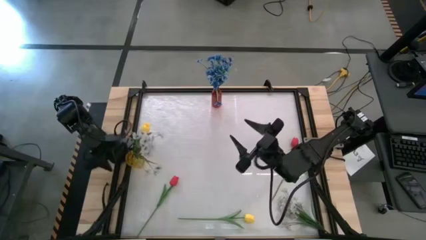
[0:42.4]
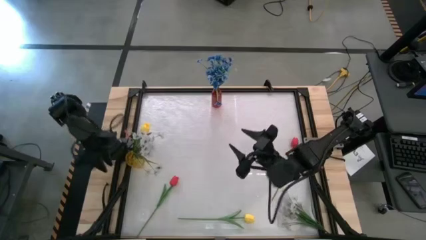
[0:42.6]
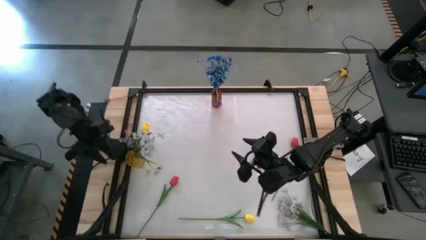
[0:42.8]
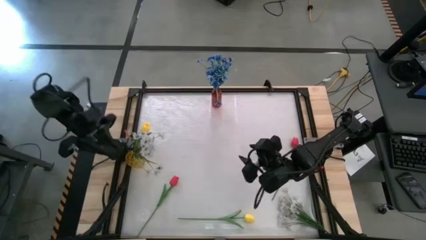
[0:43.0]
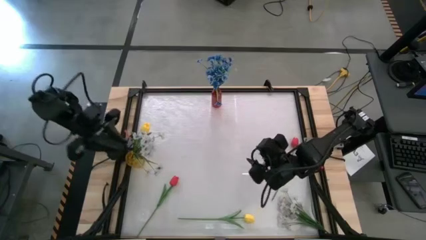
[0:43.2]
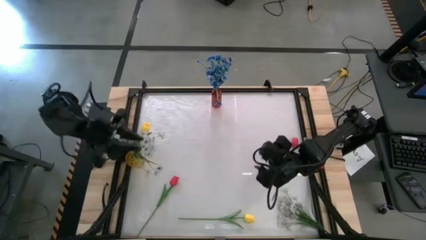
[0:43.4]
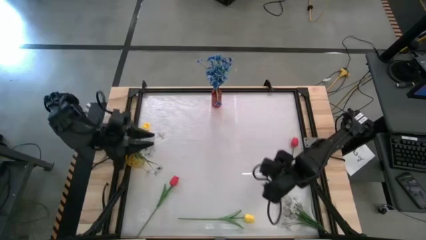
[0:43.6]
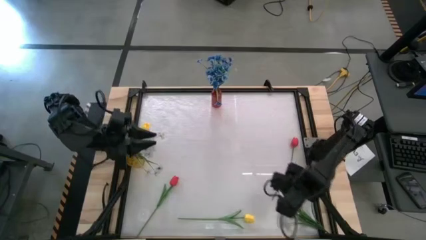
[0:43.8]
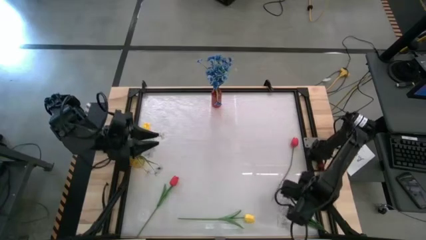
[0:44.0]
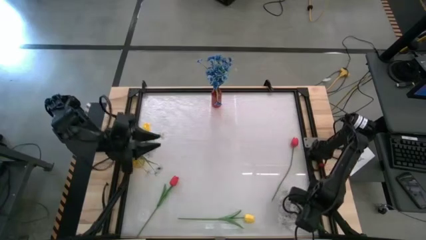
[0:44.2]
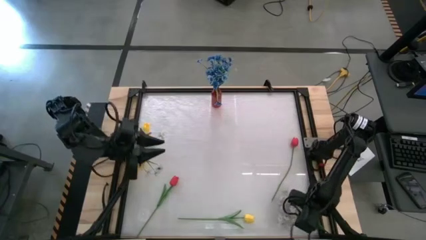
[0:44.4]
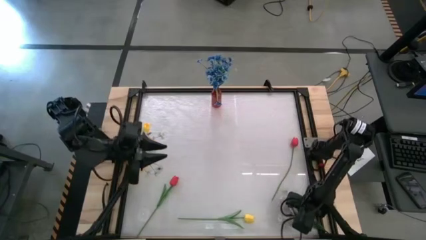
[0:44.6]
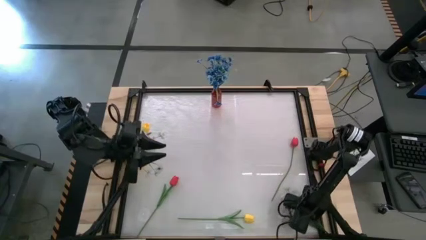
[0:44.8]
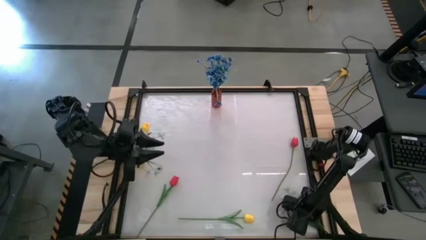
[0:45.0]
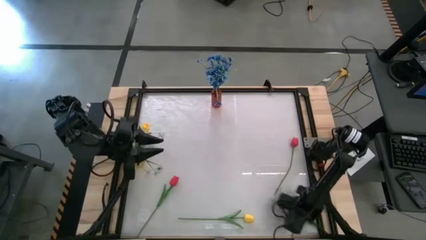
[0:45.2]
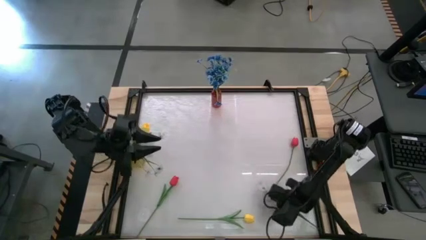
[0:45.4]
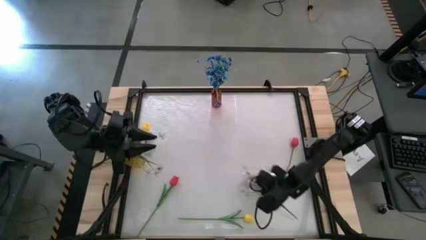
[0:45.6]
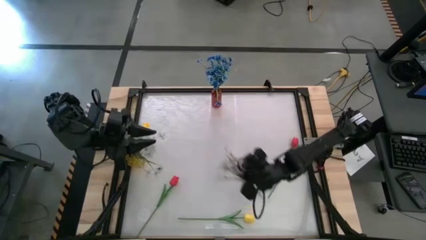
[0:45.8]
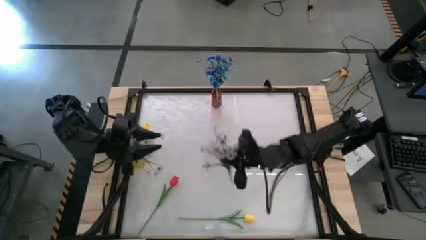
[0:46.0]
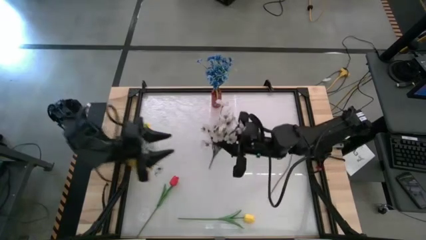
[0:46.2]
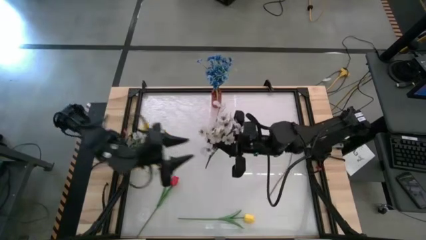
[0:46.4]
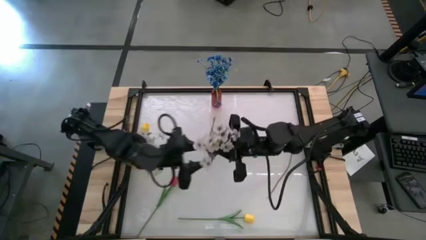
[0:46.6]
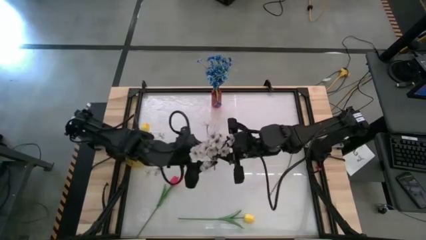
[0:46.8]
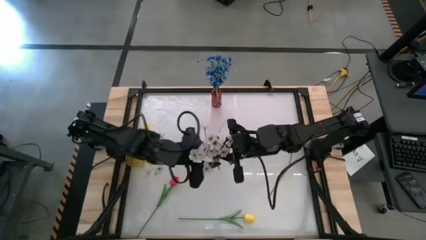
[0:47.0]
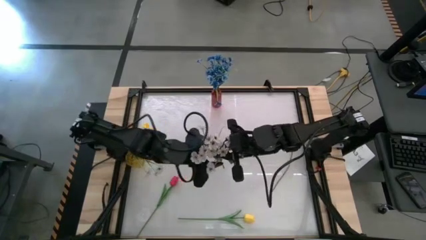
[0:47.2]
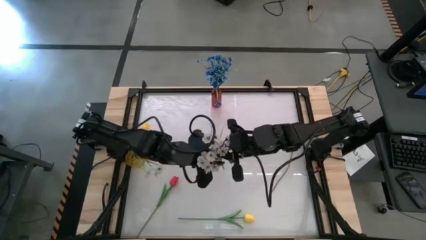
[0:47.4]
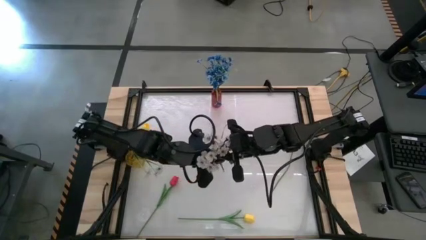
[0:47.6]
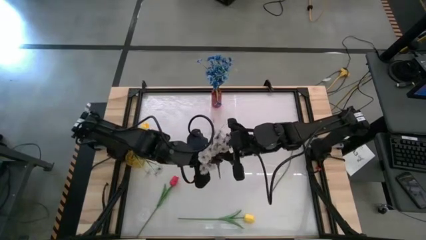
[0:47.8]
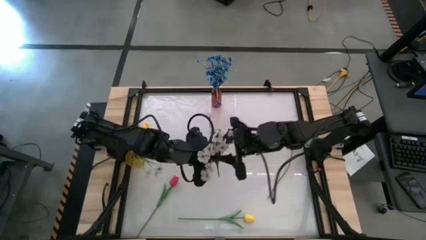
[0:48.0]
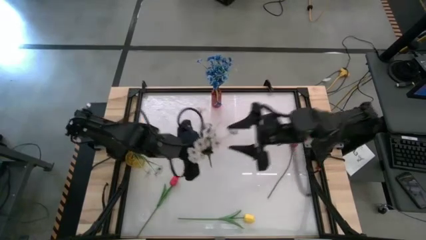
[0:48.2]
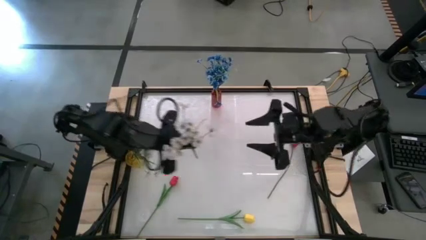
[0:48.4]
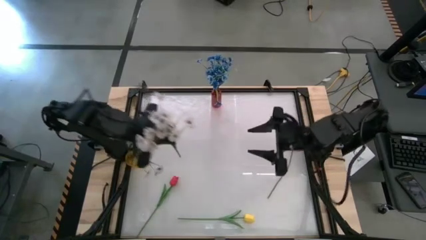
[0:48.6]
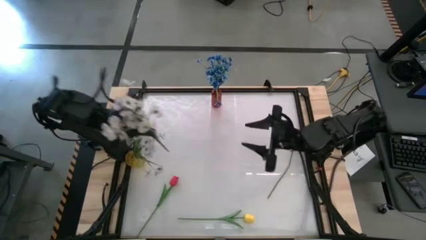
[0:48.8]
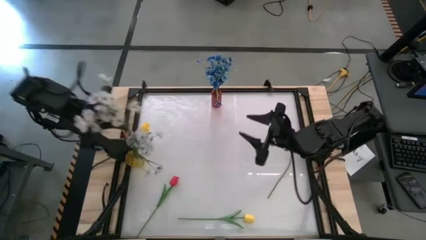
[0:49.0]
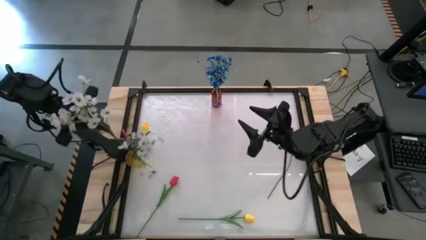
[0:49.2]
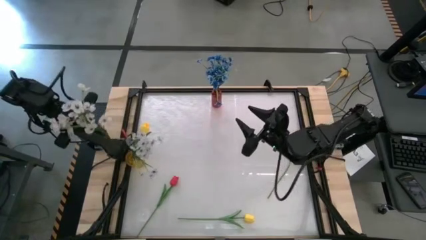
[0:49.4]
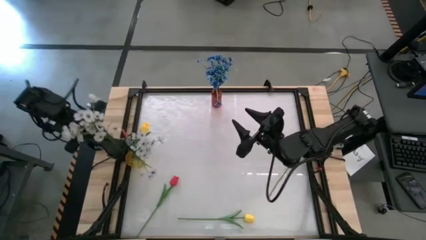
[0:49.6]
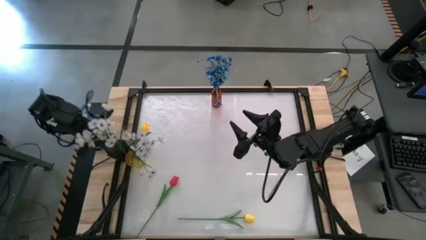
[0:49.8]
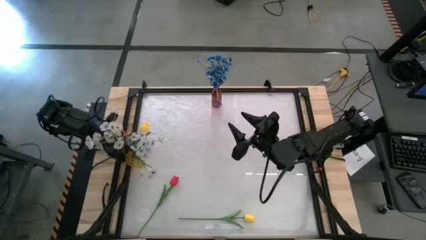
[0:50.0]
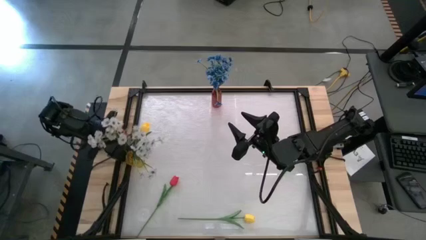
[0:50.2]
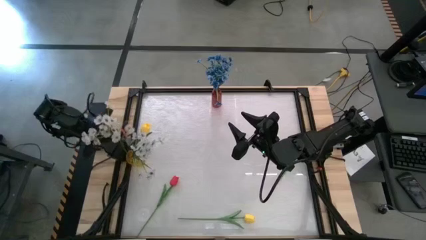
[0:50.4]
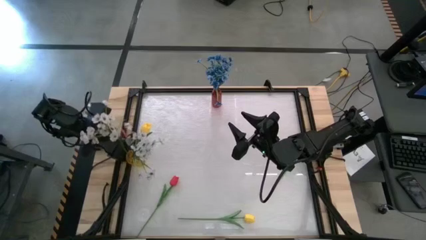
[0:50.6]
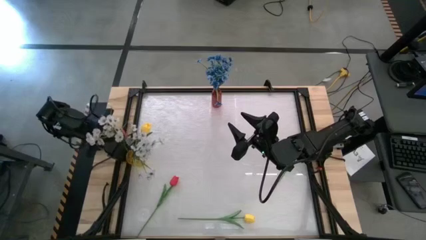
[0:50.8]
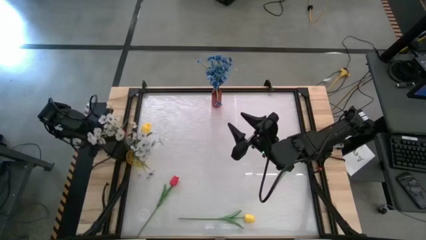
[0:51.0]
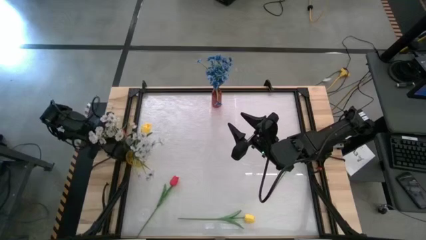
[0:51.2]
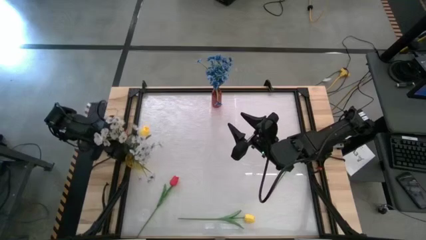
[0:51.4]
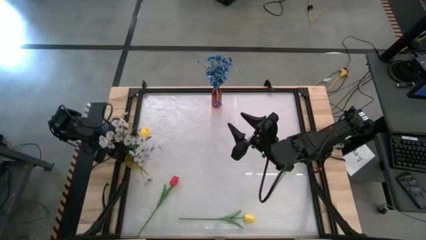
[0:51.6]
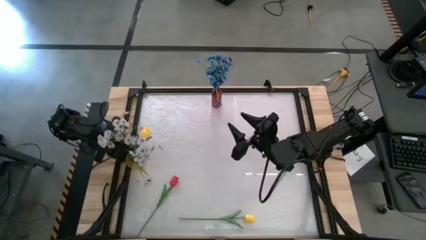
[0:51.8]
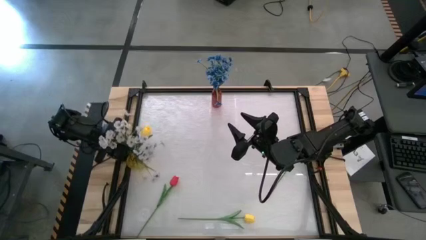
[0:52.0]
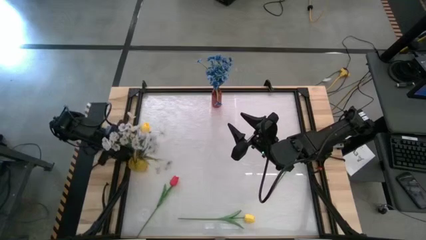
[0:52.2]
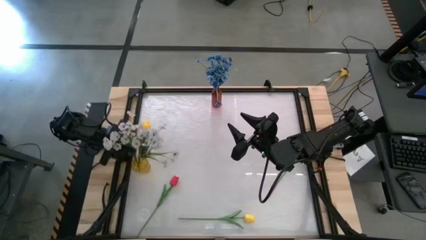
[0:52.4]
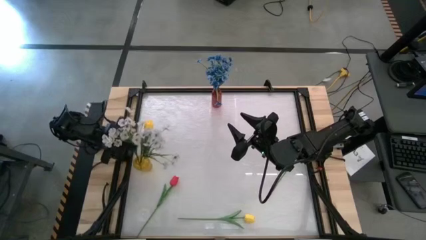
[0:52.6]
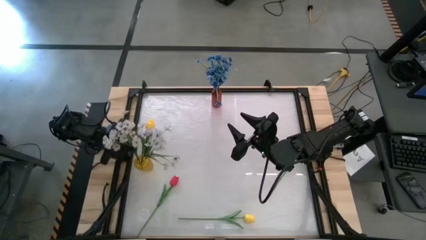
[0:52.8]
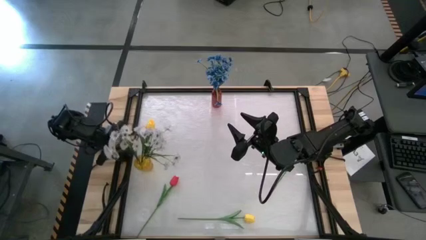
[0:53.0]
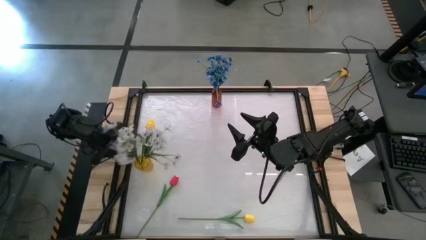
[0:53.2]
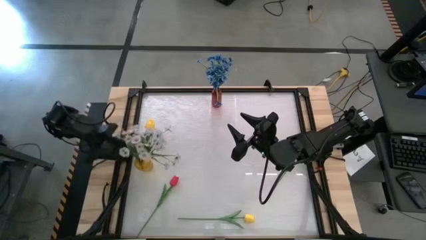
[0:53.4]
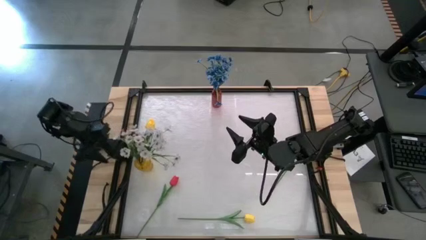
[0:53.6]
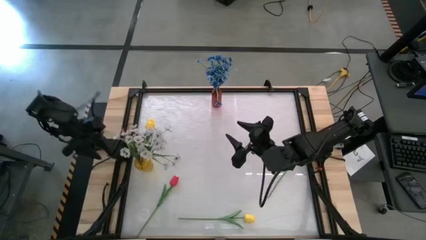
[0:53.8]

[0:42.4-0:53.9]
Task: Sort flowers into vase by color
Put the white flowers into the yellow flower vase

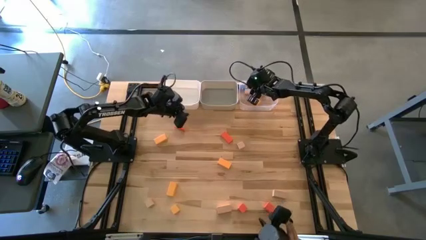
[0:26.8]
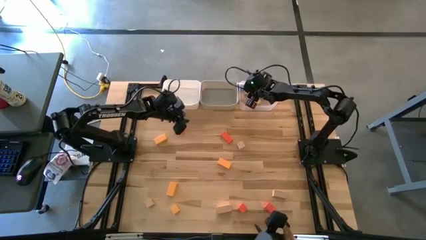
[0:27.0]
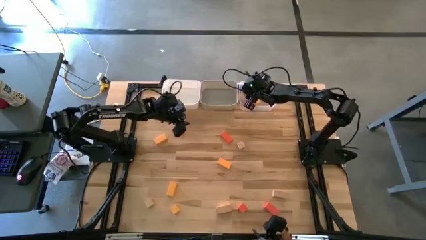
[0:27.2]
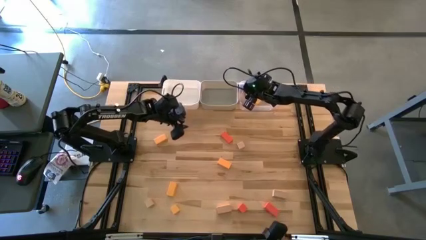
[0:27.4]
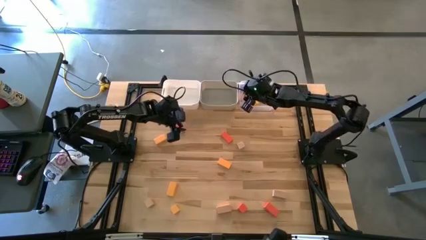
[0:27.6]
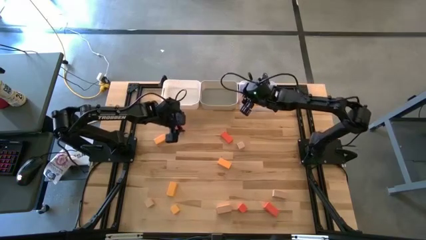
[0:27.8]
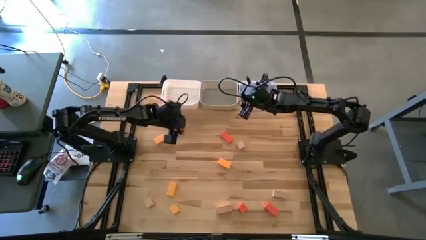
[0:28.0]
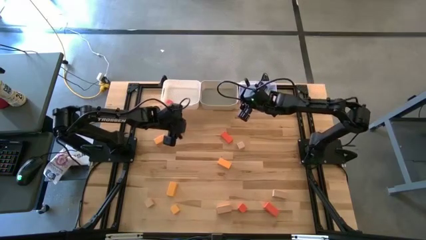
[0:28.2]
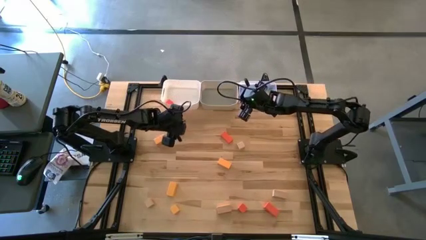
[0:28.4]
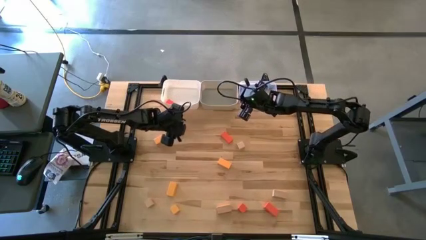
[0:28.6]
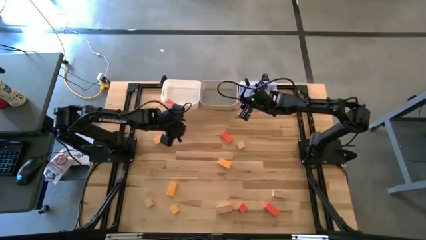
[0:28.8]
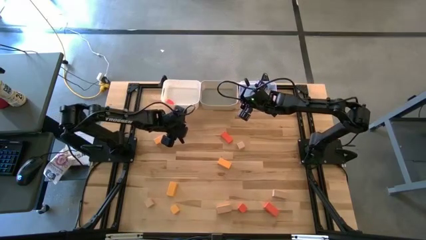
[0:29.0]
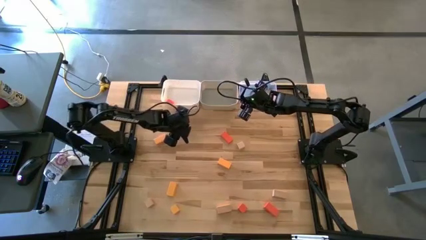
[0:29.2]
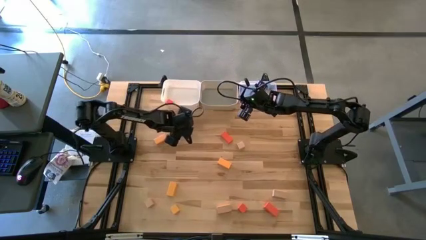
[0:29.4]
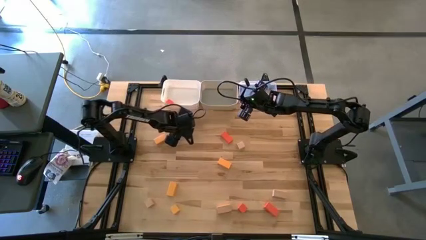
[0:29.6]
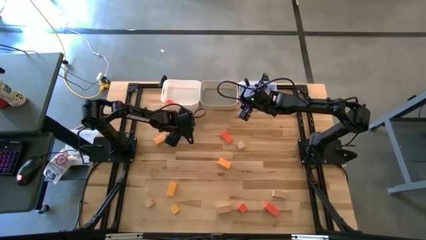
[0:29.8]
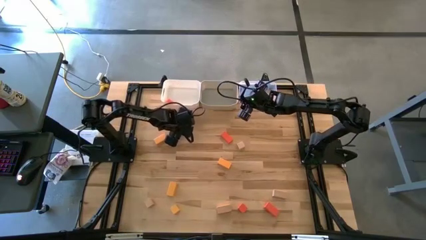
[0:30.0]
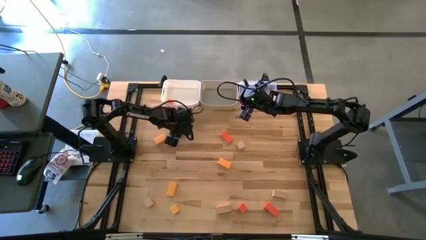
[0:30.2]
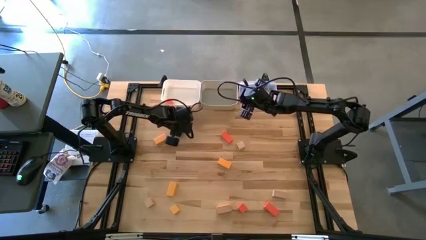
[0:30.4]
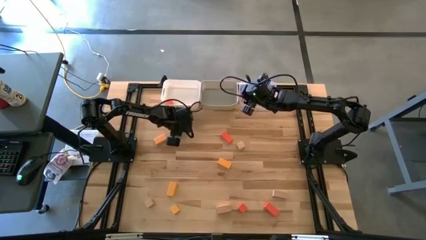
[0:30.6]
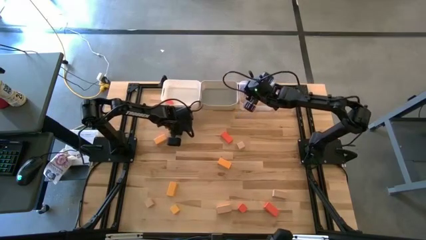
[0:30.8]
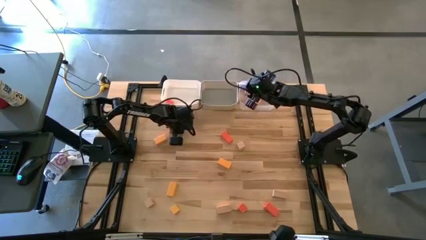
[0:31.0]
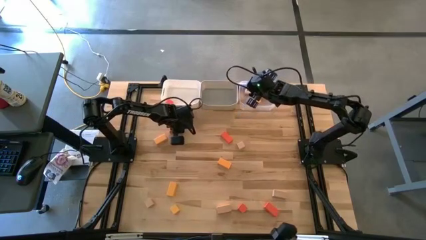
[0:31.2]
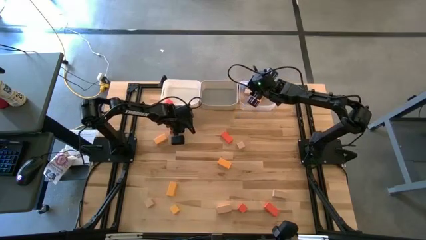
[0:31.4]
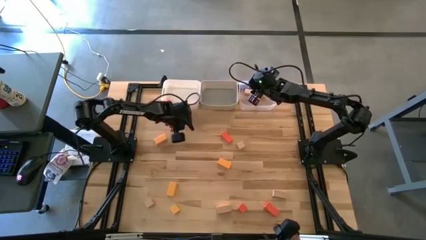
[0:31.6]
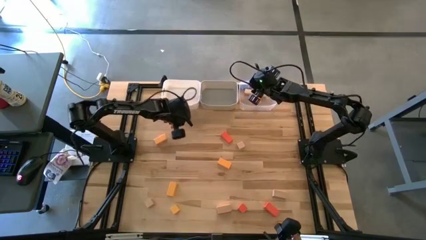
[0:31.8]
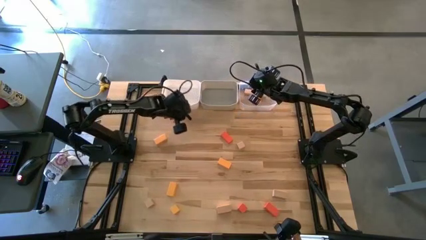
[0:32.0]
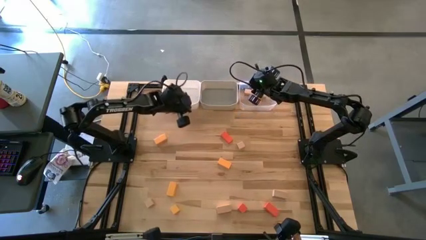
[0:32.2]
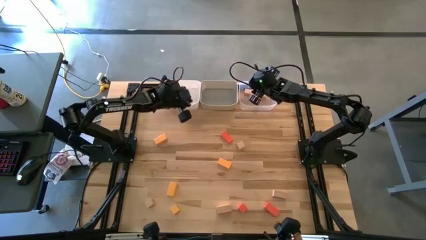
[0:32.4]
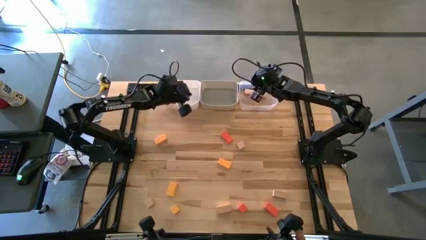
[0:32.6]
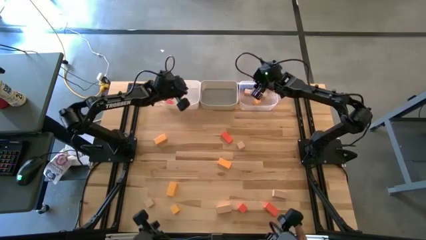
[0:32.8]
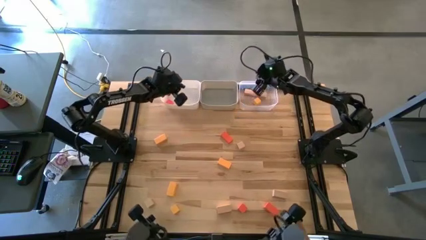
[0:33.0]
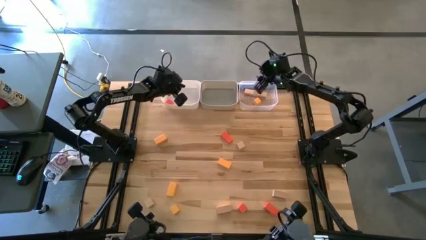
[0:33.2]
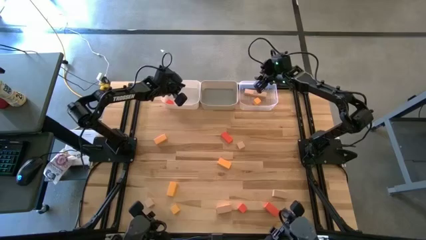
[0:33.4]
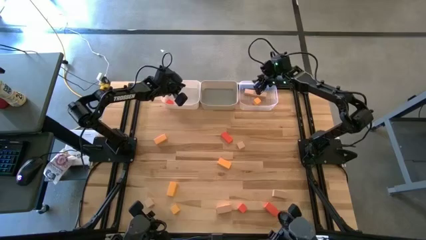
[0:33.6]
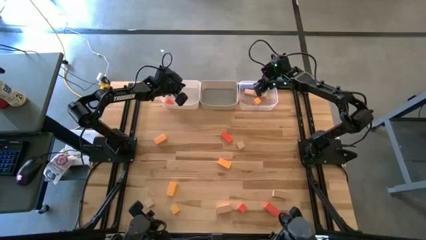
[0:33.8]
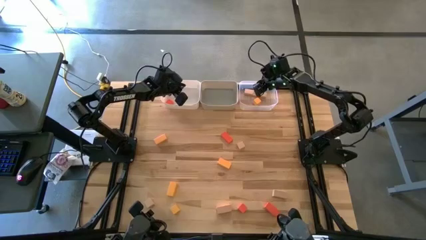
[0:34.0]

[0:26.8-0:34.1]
Task: Sort & place blocks by color
Put the orange block into the white bin
